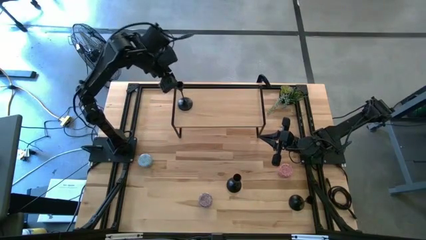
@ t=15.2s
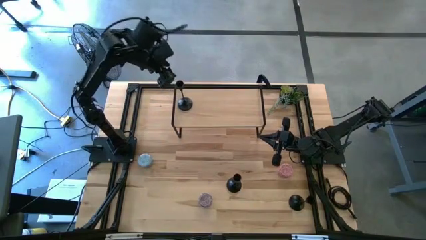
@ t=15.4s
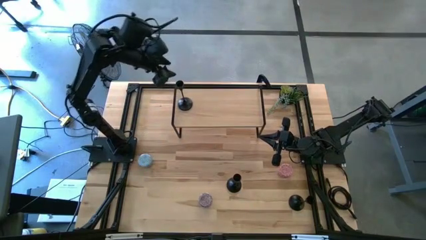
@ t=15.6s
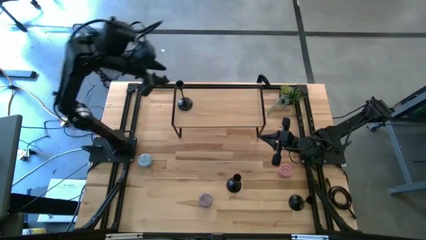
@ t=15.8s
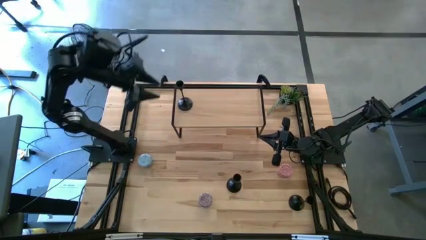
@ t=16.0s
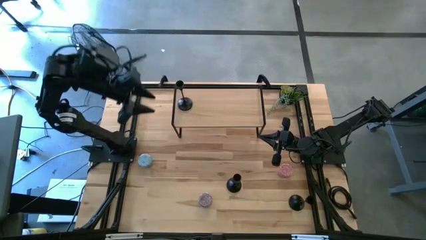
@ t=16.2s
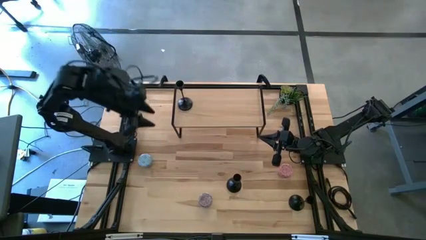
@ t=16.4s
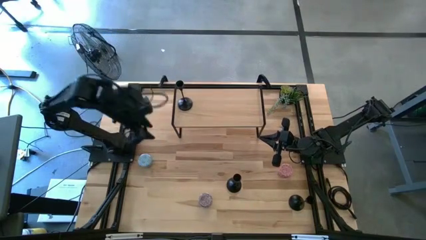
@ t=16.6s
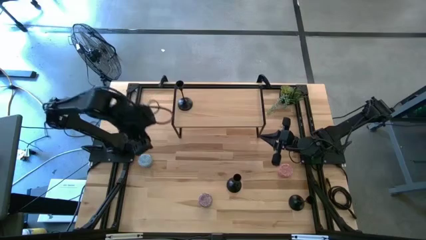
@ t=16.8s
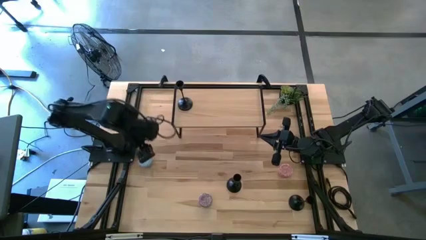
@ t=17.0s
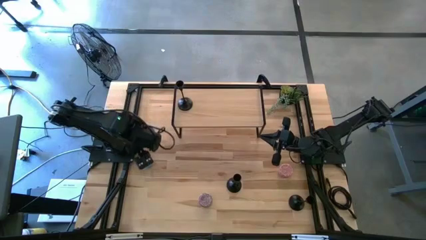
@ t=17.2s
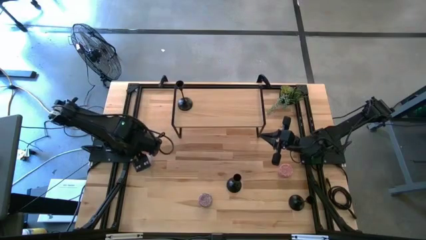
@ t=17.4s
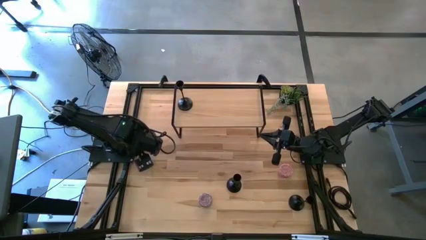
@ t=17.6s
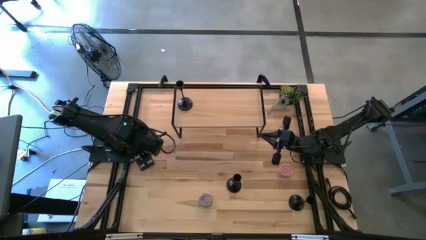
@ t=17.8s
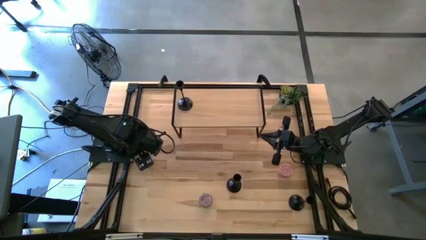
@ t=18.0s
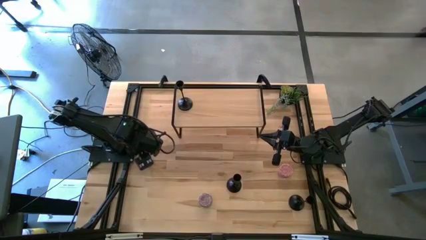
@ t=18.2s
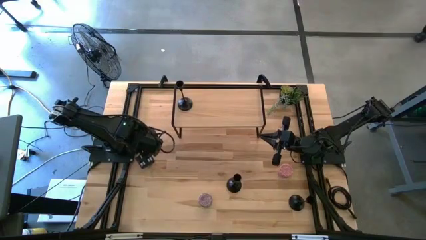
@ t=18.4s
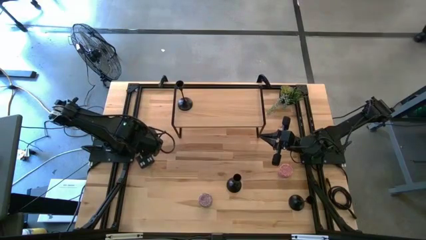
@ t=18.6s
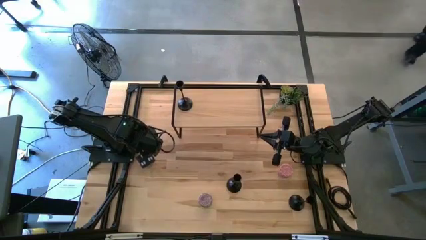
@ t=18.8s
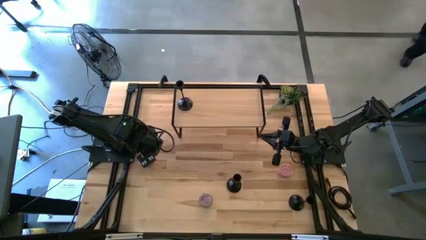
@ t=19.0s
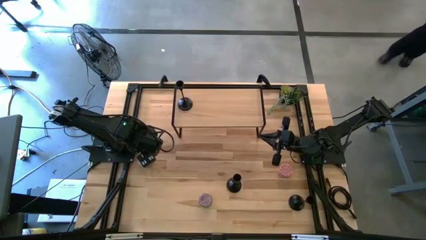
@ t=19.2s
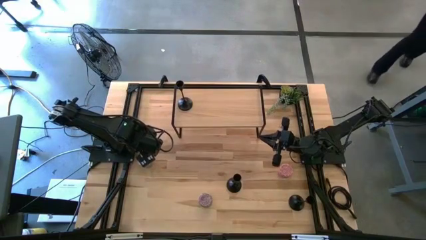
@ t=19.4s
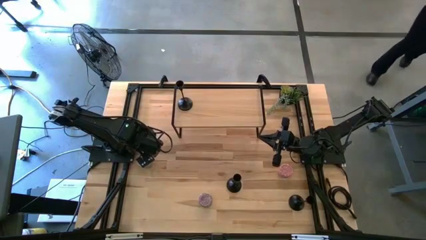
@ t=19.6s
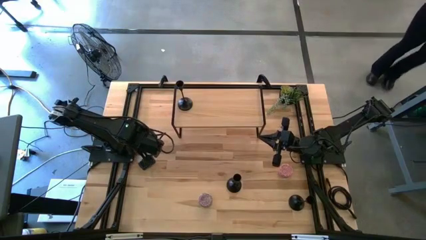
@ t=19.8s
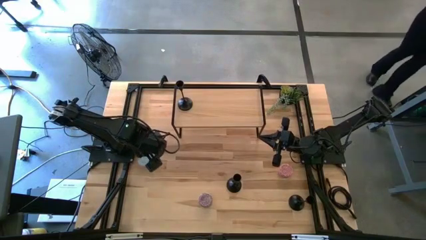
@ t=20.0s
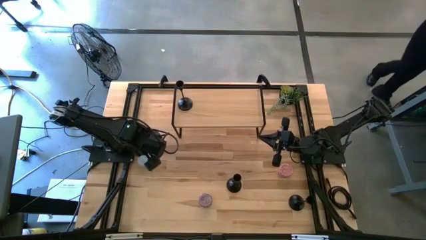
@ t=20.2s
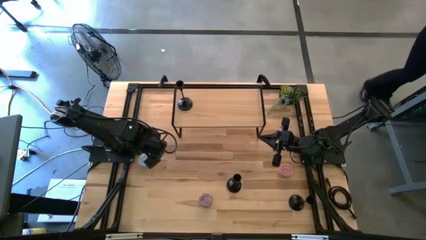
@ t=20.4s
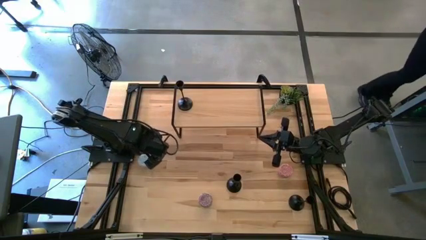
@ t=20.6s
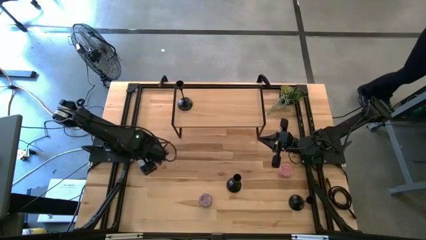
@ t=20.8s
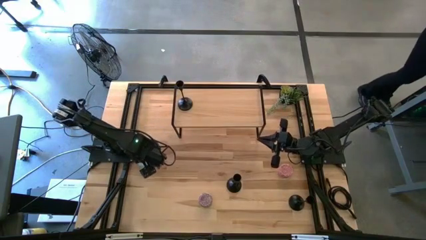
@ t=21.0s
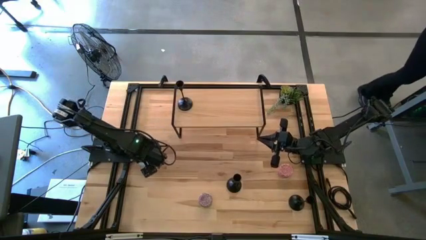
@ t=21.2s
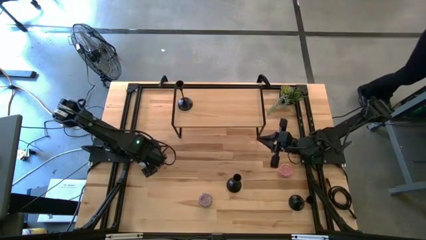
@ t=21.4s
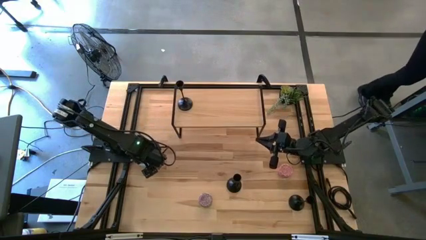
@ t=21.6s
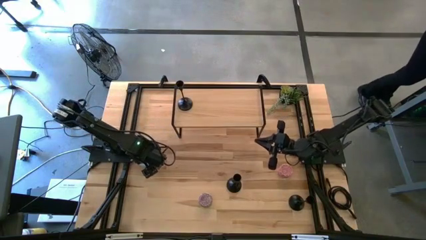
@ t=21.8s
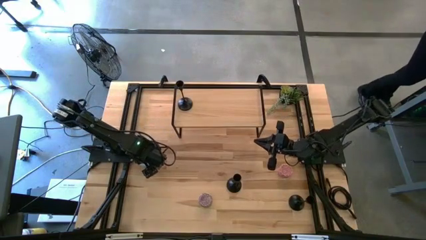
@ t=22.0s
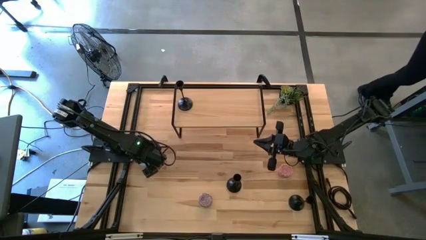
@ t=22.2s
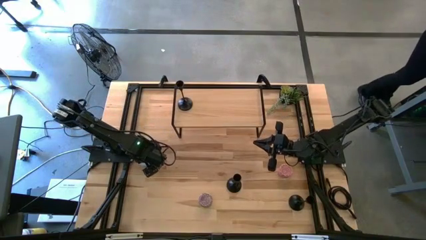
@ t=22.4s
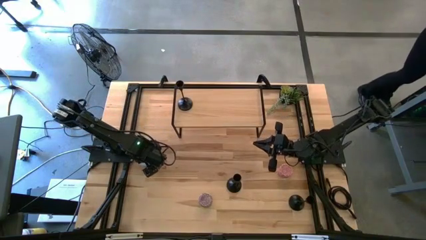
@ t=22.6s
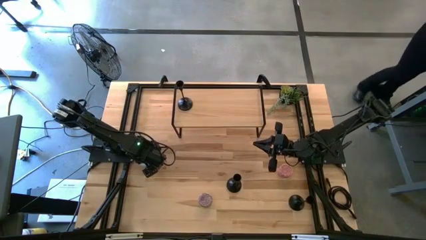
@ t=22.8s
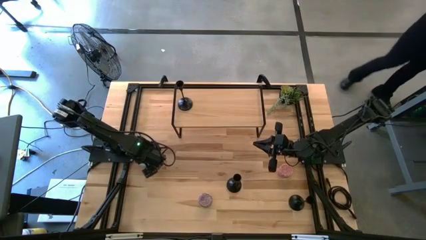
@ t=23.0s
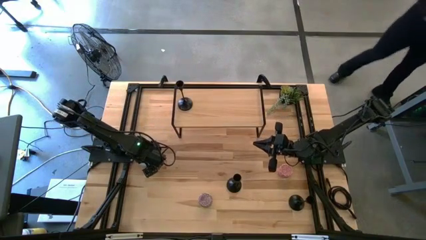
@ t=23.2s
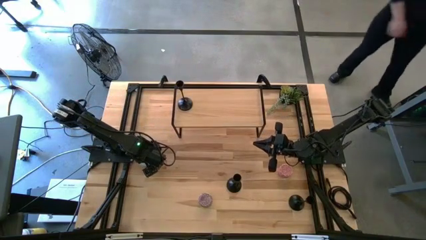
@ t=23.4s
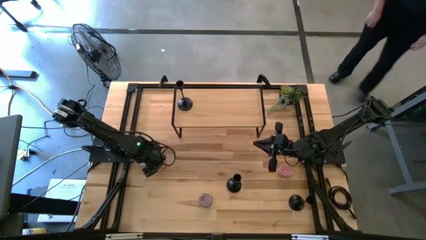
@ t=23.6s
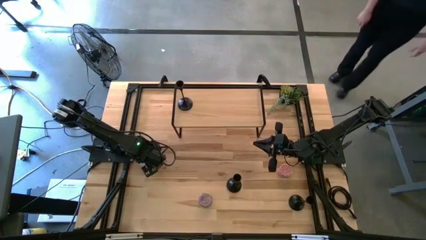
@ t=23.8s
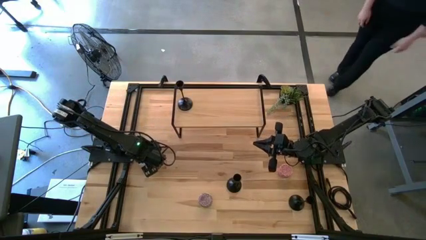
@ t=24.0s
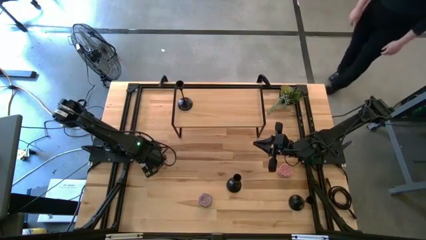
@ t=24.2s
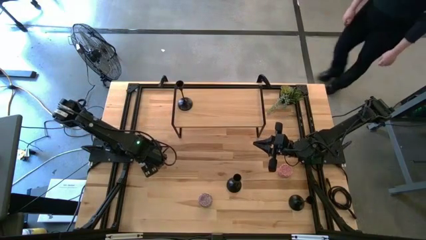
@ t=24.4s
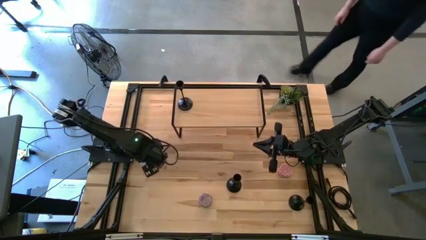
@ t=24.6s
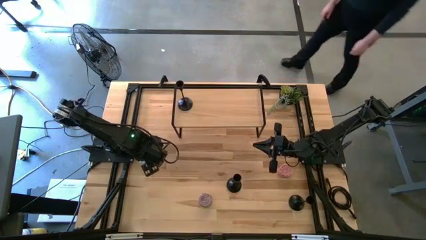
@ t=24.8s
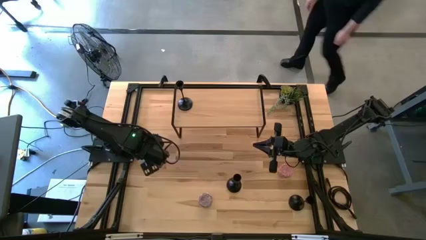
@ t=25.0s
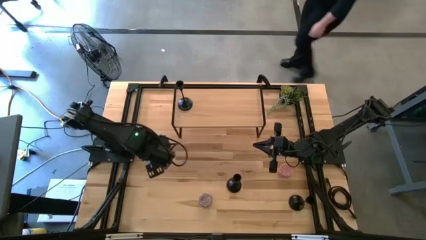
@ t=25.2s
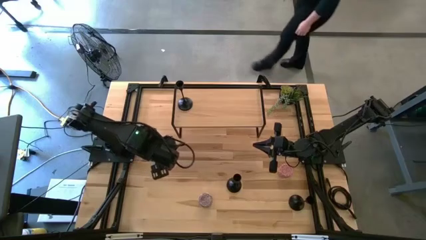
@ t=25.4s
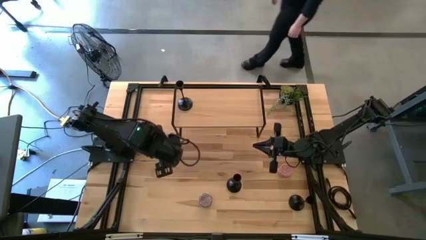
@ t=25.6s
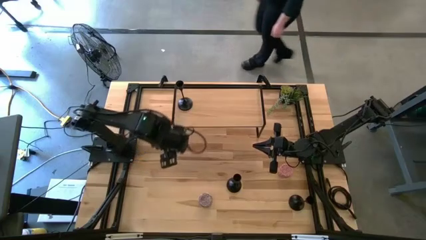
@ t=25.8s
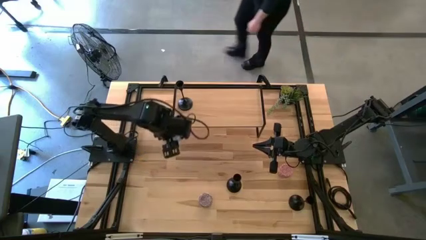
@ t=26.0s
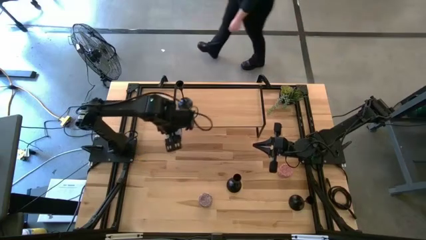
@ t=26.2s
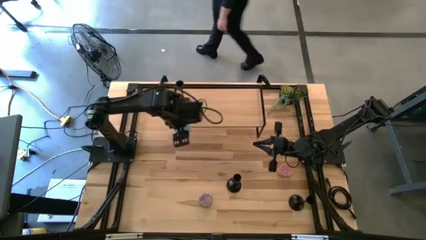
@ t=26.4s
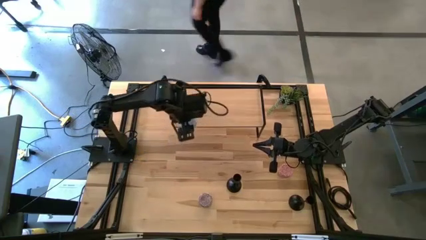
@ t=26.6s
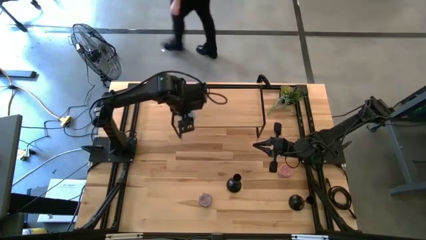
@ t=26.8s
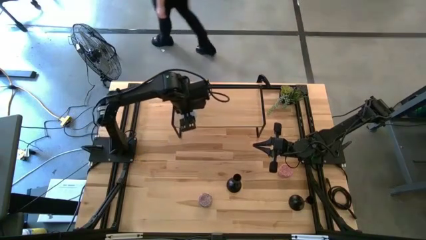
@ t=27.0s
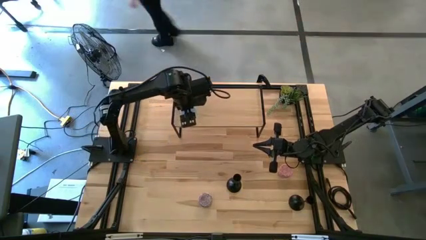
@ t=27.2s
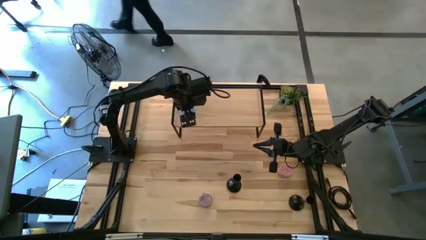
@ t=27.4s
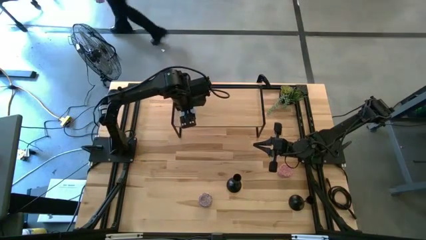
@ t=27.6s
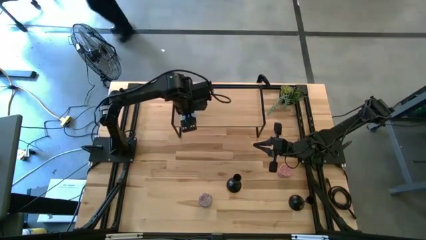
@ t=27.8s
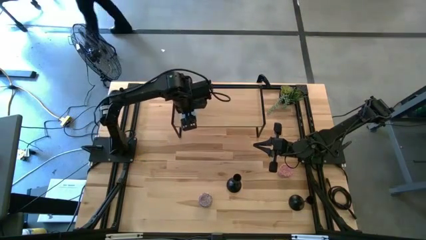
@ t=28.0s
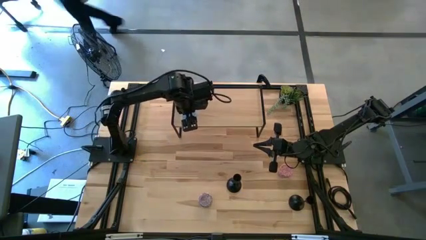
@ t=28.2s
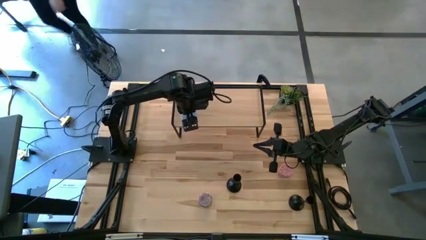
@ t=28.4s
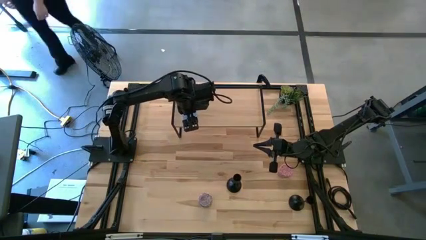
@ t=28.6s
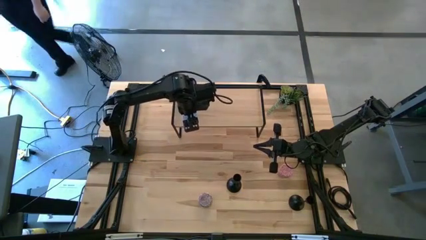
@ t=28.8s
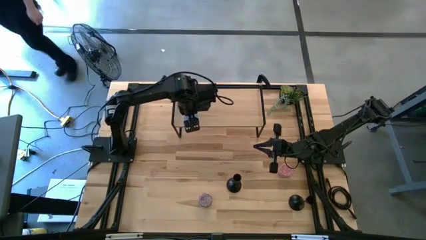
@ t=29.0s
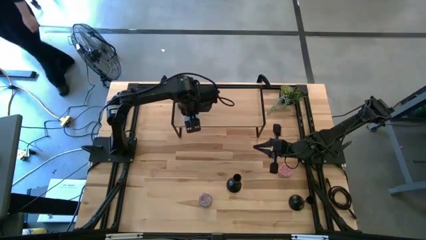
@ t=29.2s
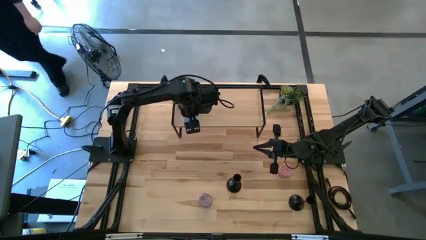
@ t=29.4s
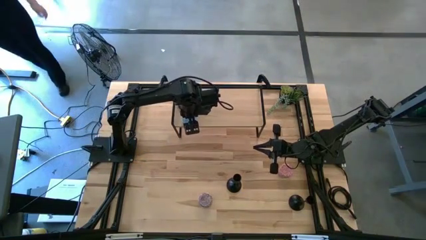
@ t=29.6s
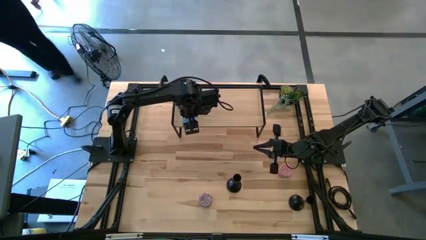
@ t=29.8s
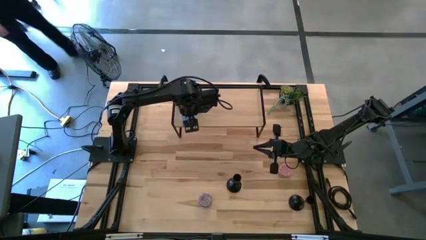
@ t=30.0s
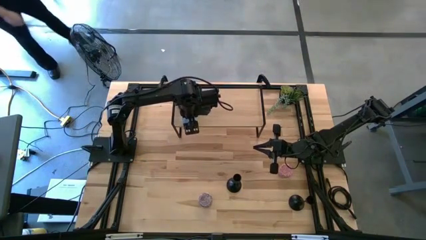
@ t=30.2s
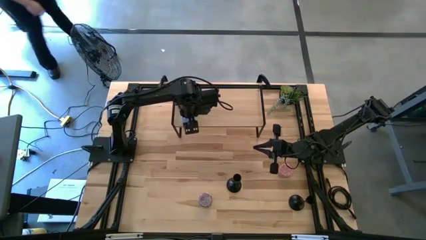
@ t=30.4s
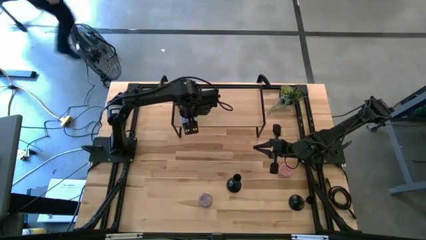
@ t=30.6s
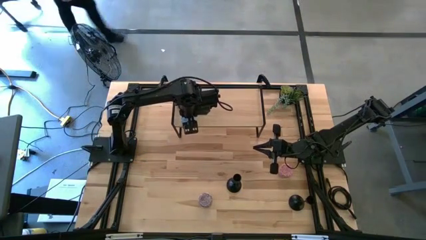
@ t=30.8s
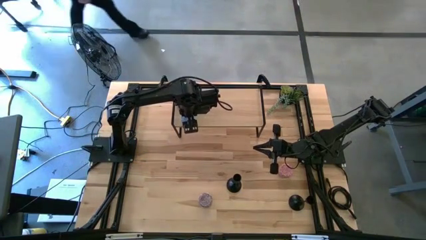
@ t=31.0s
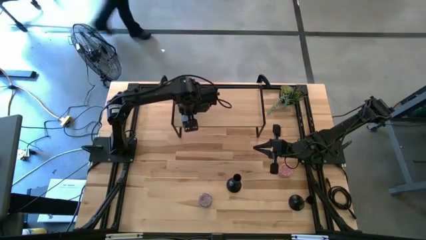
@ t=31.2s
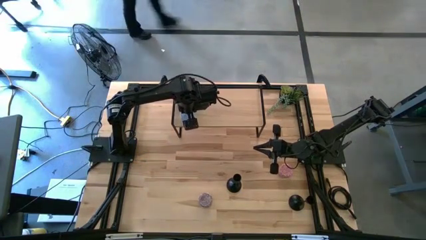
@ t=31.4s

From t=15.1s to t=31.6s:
Task: Pick & Place candle stick holders
Put the blue scented candle on the shelf
